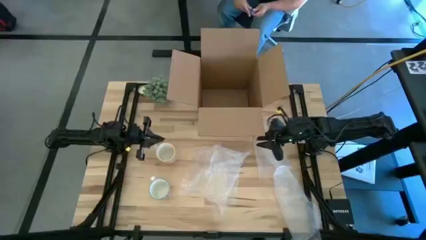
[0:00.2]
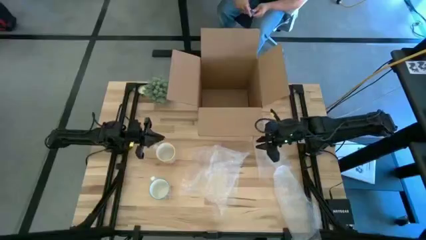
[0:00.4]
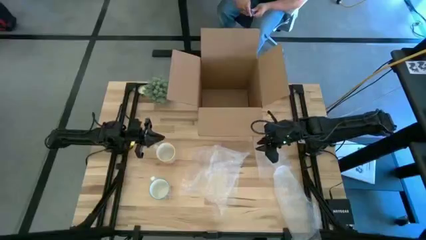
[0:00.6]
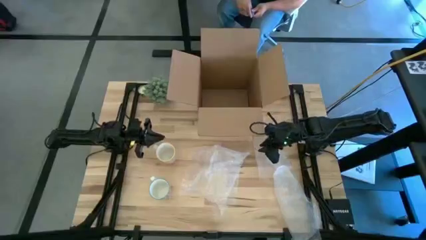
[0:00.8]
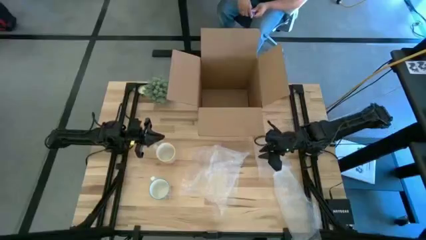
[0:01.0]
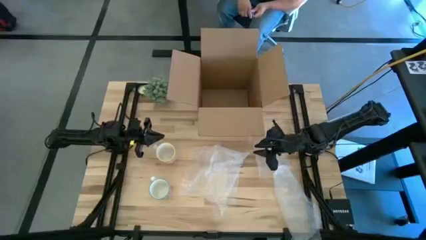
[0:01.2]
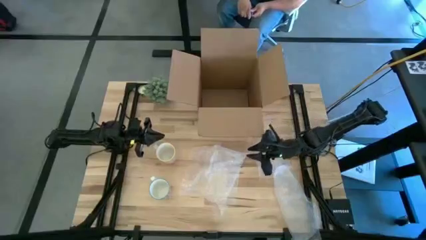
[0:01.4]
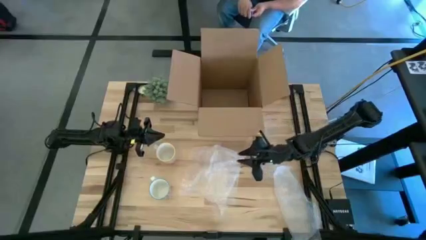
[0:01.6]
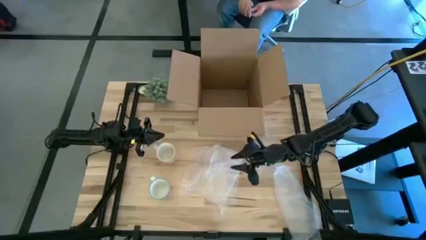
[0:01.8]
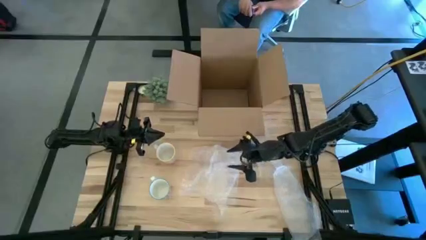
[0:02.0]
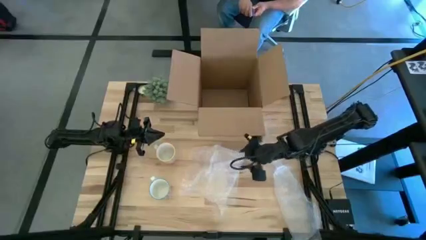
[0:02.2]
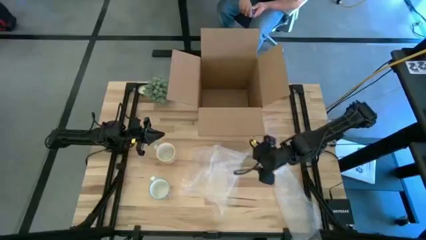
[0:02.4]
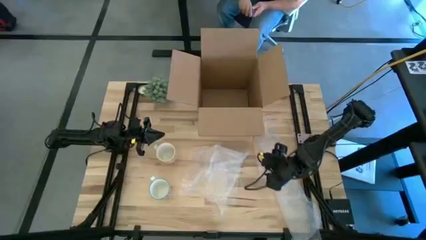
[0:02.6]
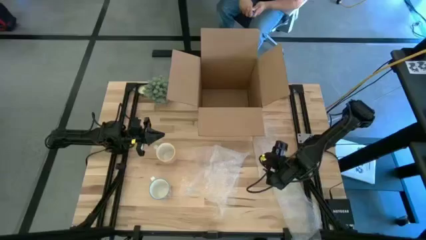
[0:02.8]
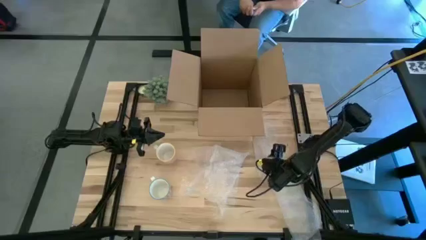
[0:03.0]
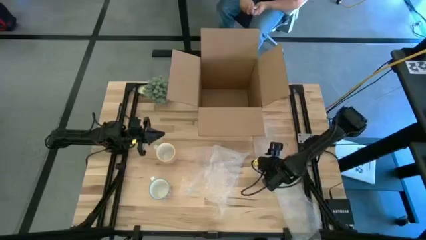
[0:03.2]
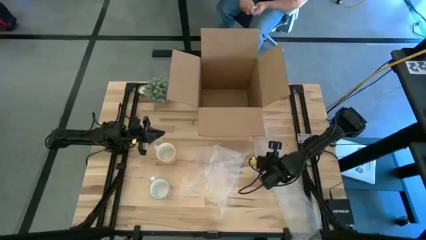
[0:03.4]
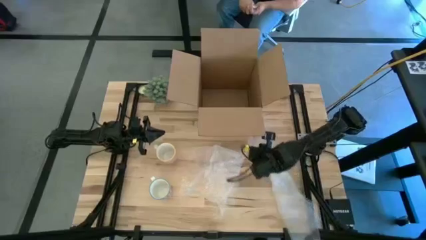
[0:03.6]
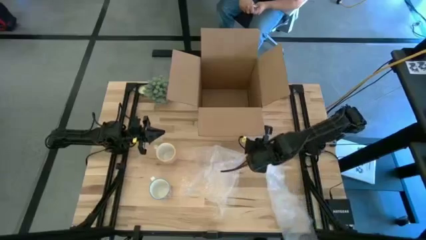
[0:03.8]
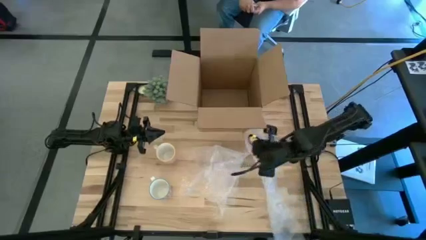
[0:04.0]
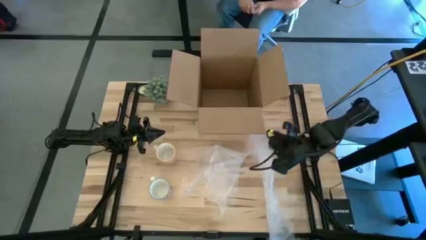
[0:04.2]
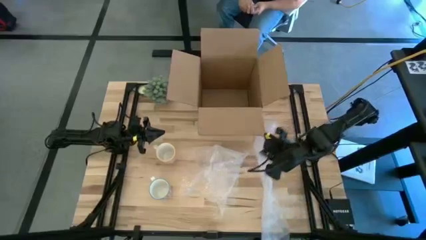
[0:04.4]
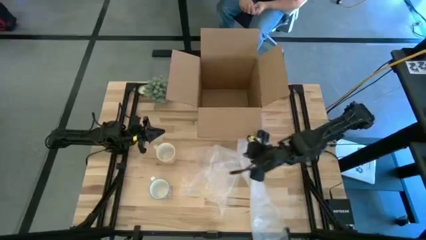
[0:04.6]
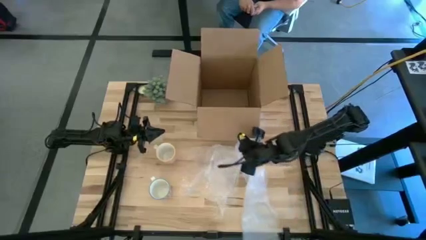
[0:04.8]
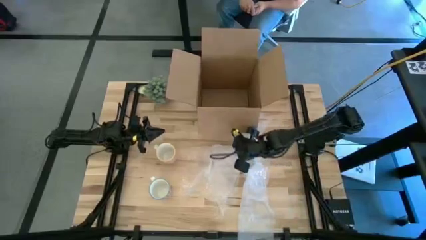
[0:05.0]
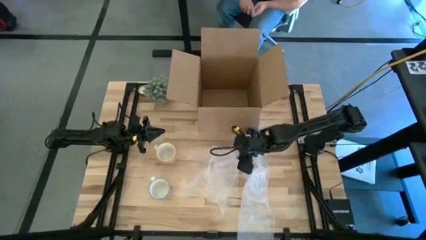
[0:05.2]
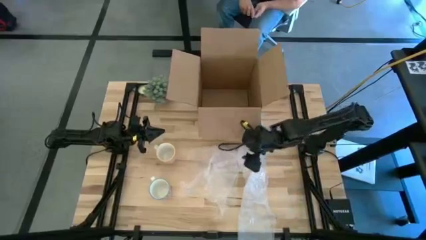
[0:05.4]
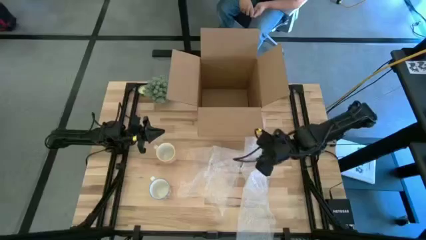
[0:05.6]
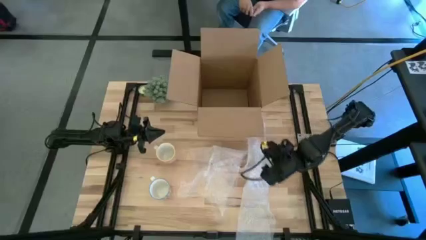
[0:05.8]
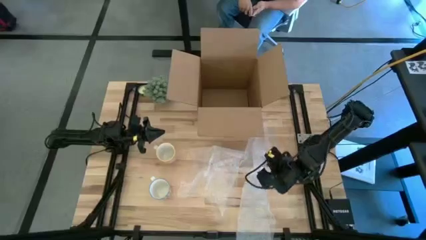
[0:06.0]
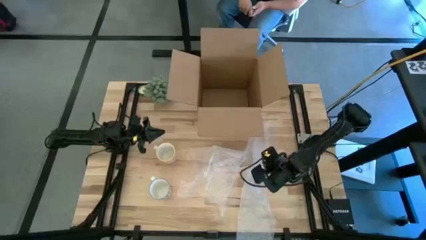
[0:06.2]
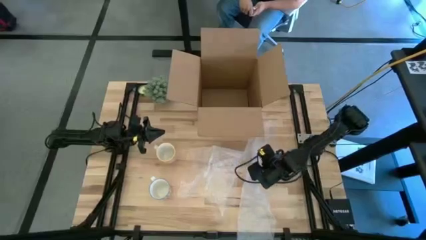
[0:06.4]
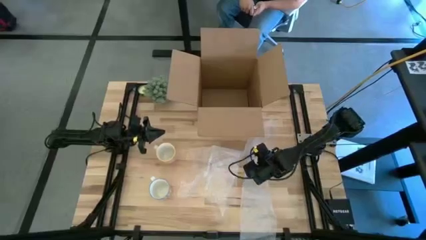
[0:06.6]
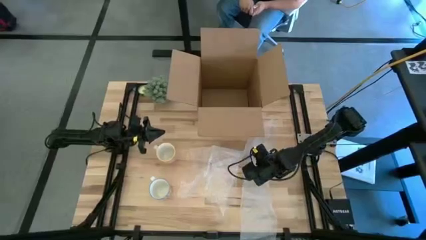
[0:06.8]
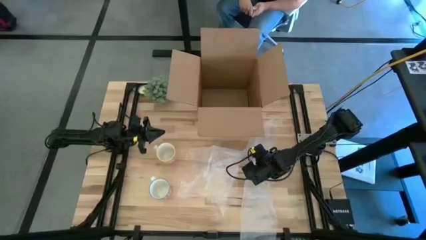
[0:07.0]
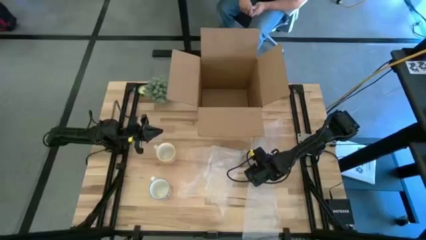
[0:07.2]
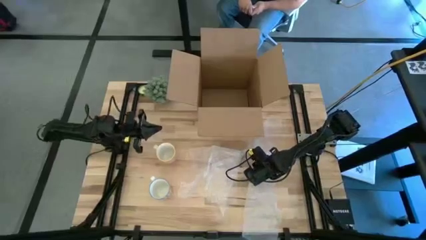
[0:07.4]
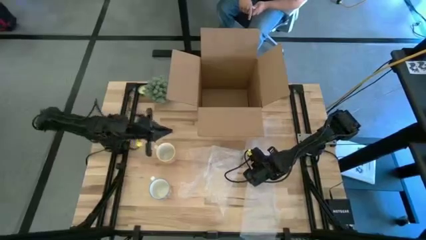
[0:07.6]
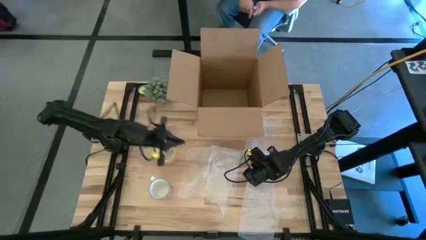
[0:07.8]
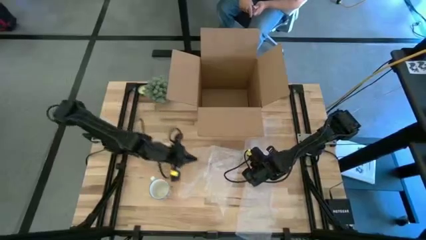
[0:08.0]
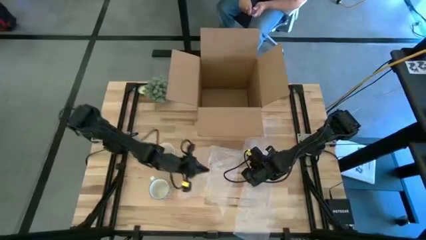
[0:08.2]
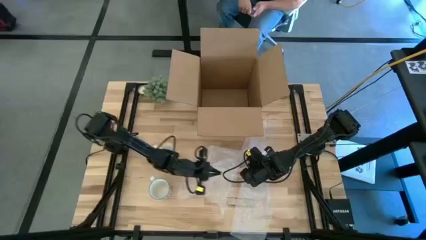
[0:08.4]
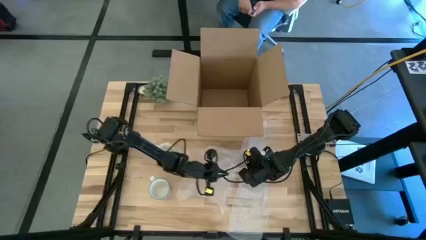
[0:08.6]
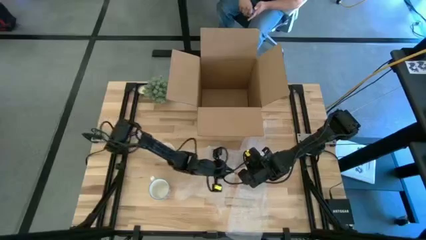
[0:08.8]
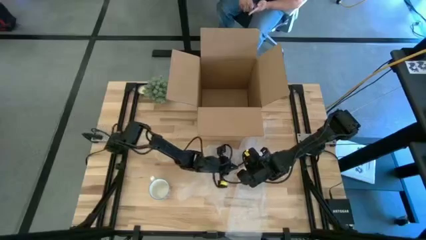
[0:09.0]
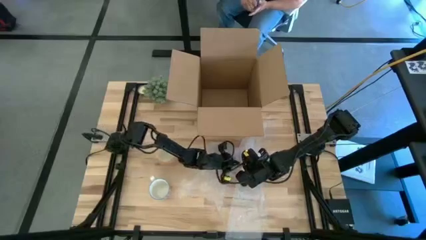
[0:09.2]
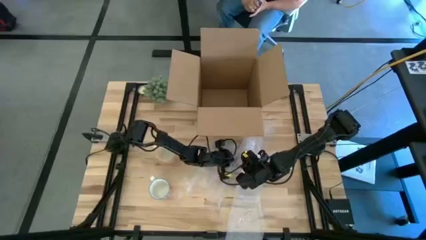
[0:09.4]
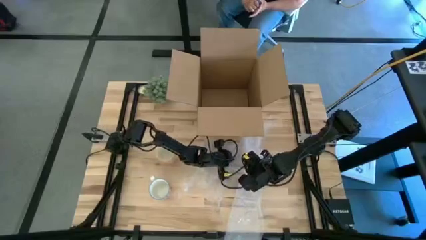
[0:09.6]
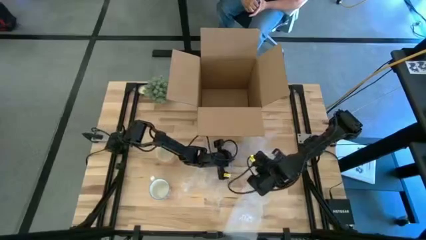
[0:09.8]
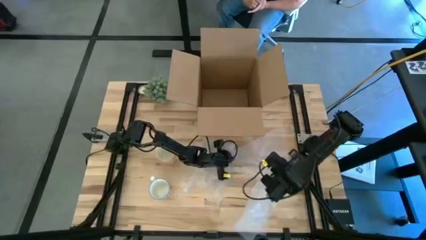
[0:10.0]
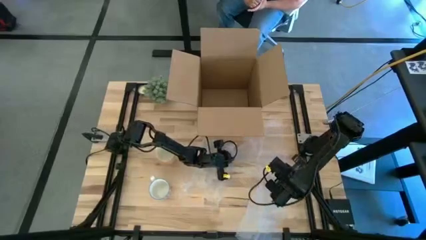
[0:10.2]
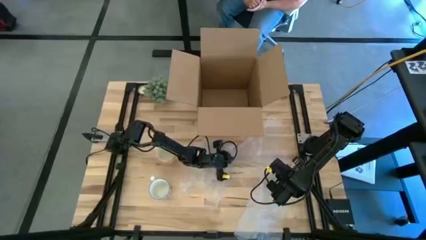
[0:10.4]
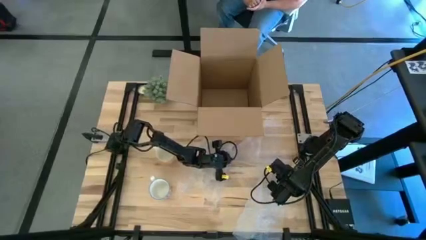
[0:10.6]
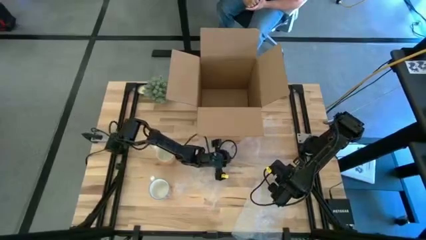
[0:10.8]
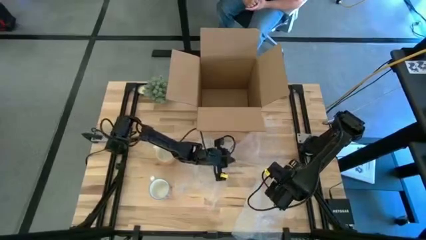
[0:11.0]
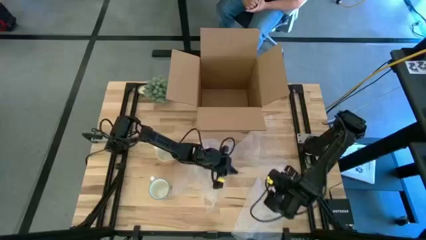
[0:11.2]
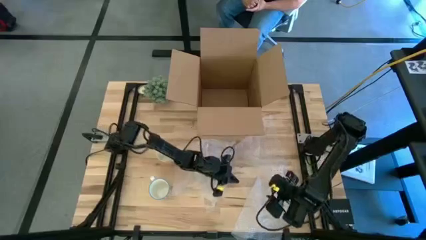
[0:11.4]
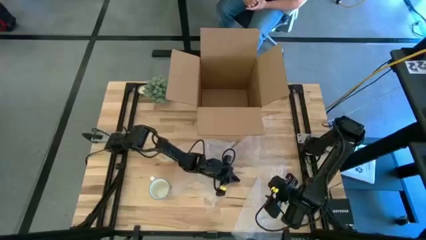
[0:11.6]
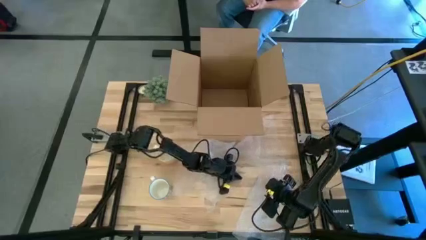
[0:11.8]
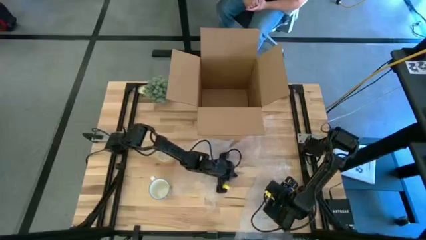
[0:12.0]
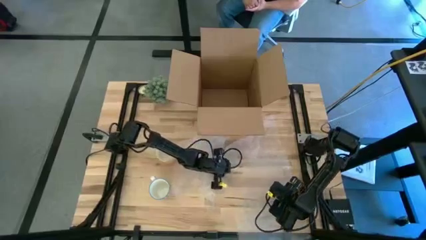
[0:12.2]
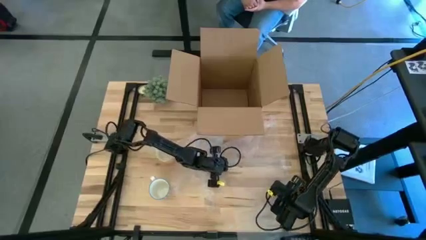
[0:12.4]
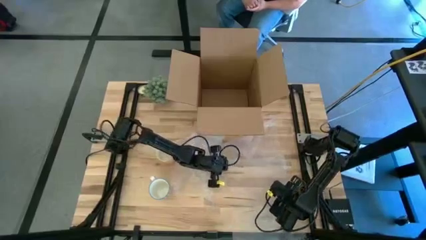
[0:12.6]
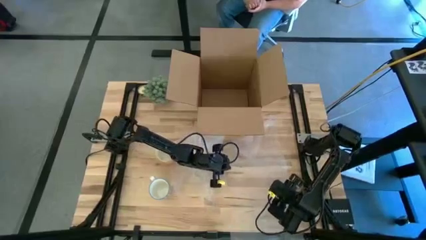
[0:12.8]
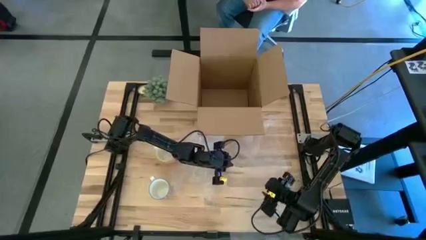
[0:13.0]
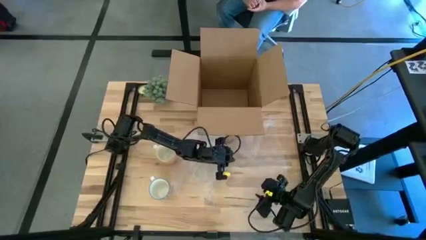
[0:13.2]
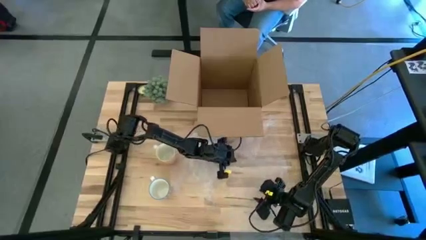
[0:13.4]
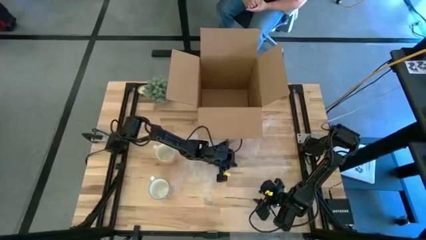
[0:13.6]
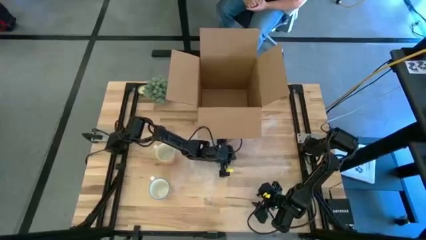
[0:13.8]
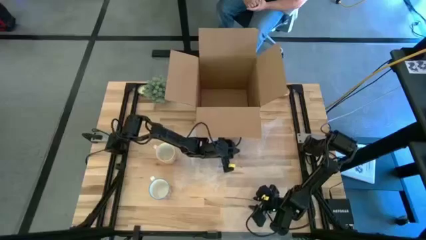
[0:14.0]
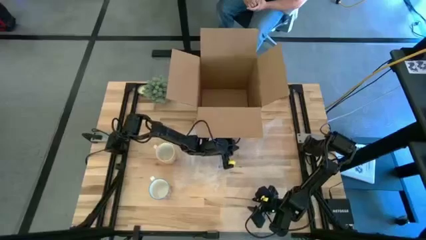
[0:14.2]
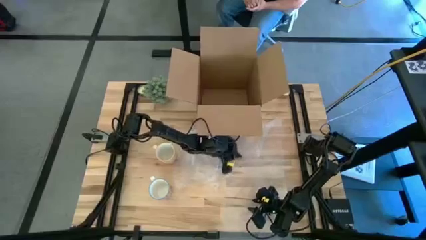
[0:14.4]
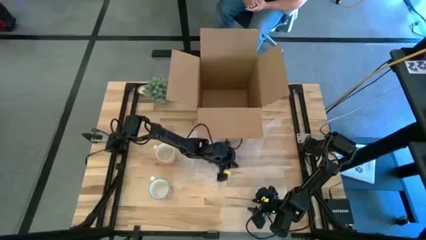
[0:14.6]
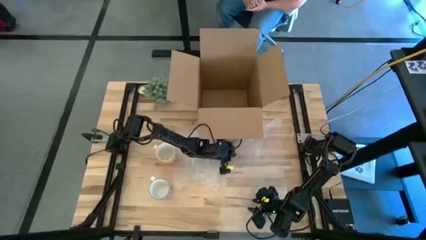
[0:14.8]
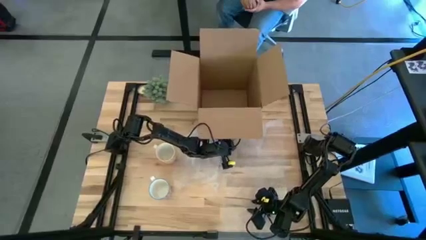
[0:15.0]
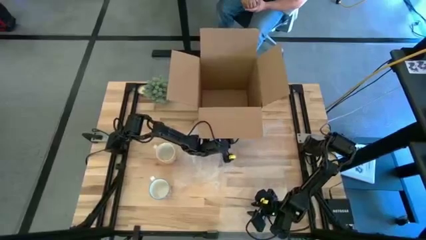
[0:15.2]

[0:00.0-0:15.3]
Task: wrap mug
Prepare the right bubble wrap on the table
